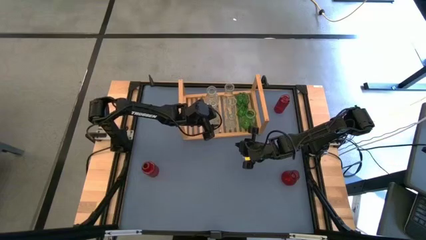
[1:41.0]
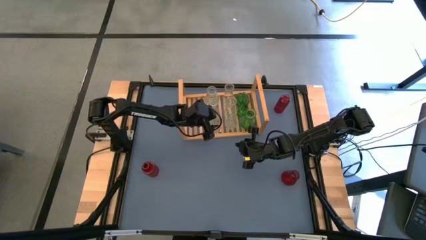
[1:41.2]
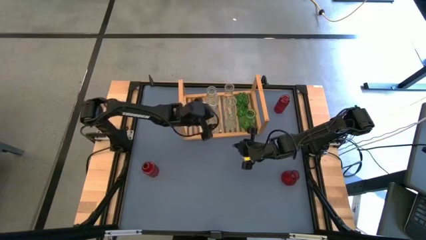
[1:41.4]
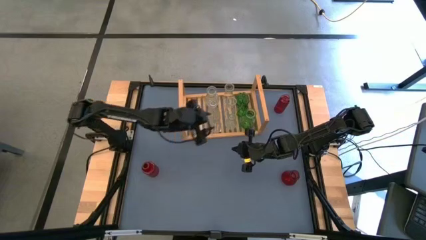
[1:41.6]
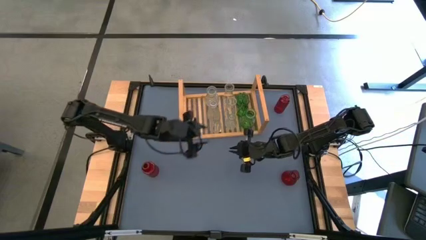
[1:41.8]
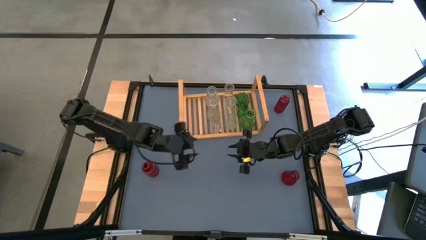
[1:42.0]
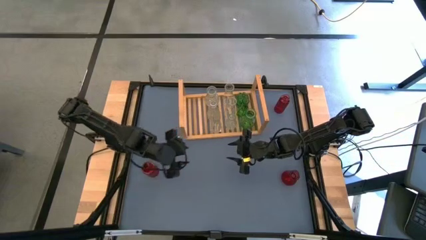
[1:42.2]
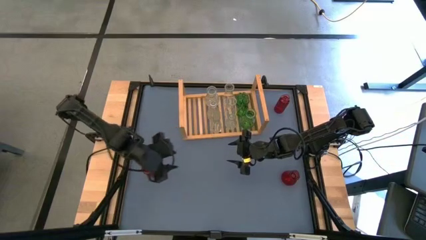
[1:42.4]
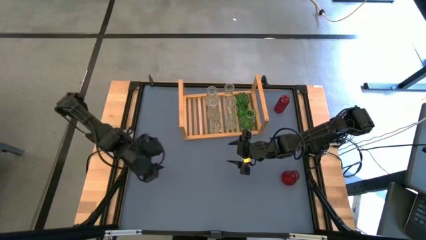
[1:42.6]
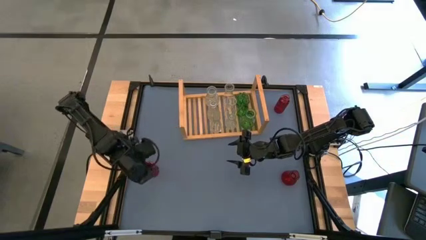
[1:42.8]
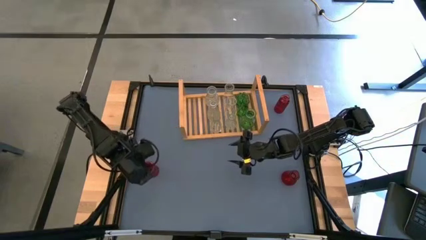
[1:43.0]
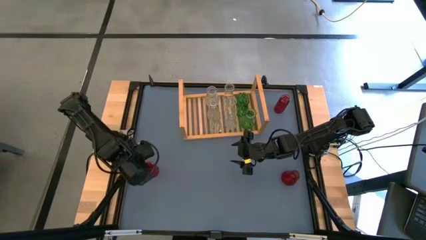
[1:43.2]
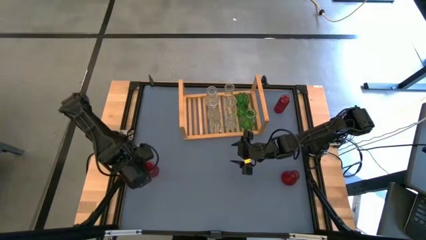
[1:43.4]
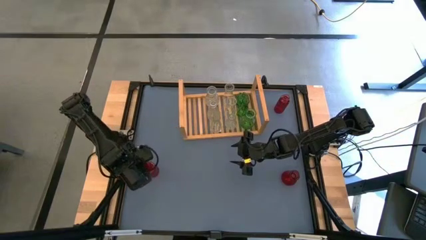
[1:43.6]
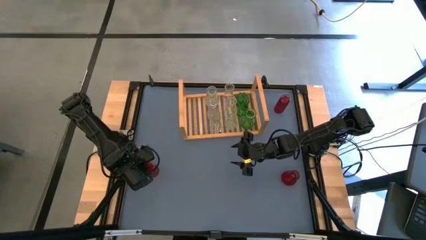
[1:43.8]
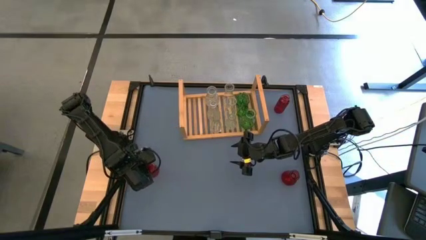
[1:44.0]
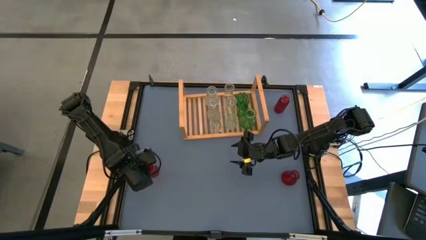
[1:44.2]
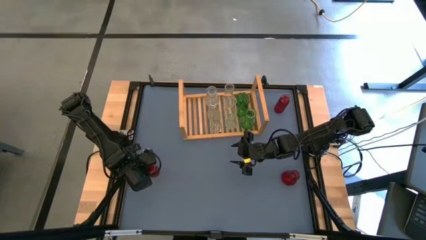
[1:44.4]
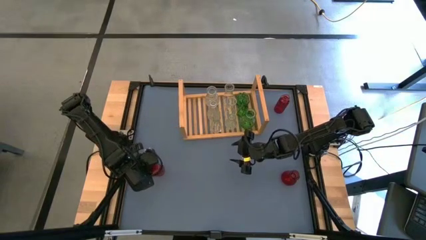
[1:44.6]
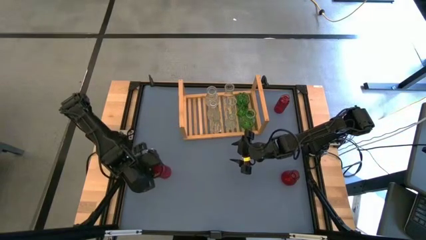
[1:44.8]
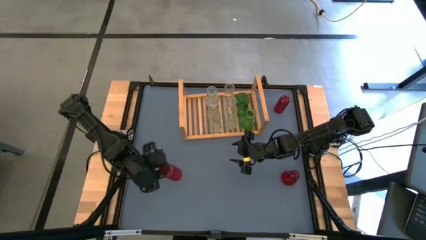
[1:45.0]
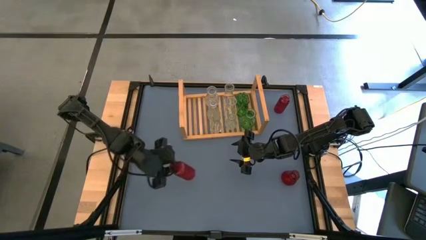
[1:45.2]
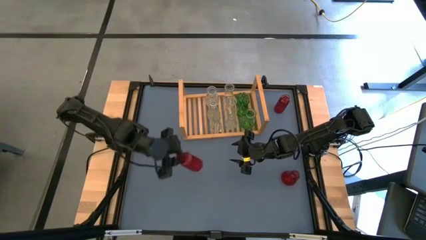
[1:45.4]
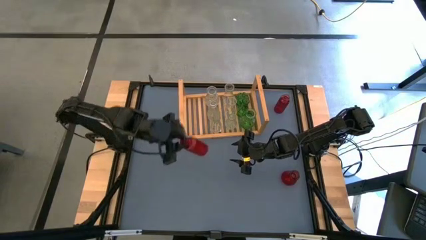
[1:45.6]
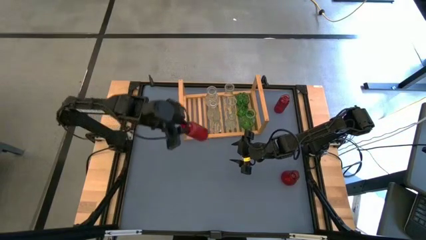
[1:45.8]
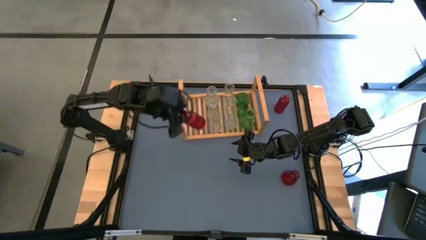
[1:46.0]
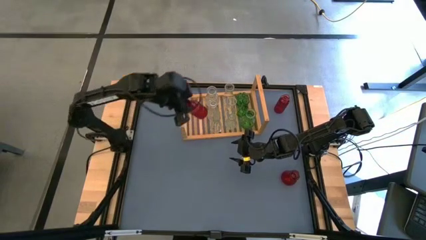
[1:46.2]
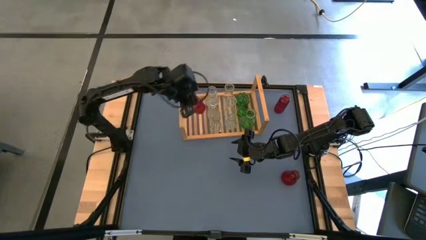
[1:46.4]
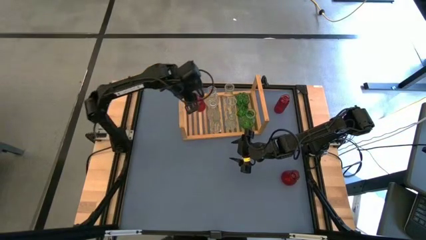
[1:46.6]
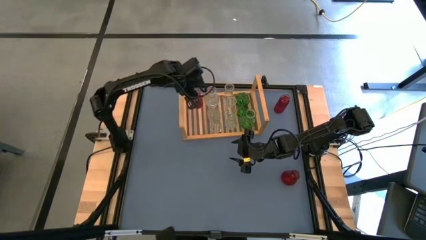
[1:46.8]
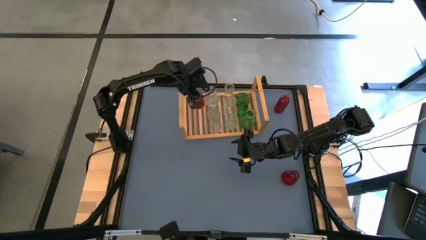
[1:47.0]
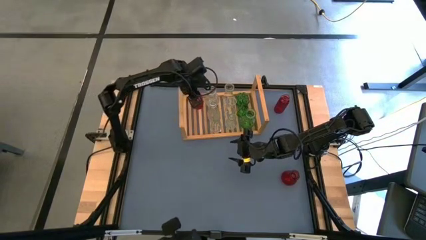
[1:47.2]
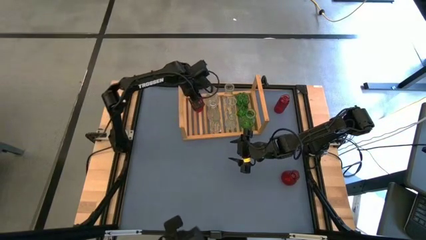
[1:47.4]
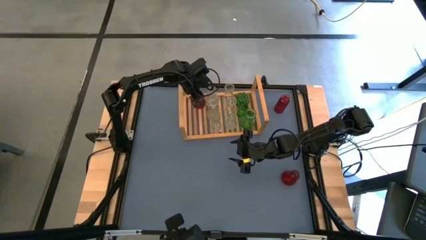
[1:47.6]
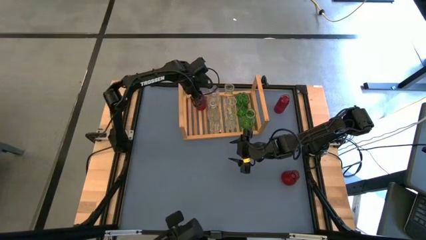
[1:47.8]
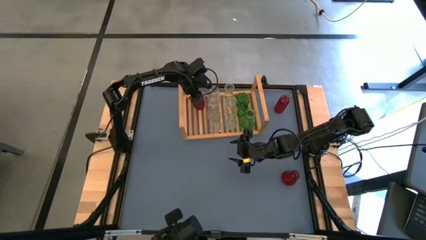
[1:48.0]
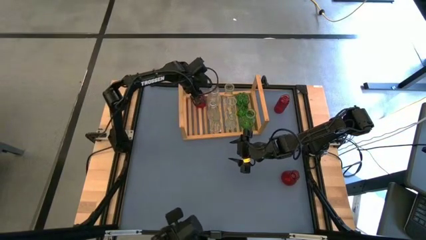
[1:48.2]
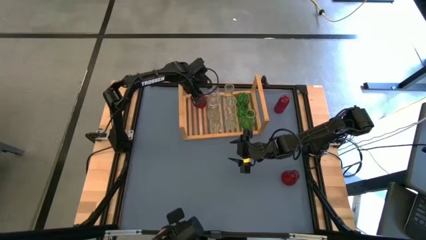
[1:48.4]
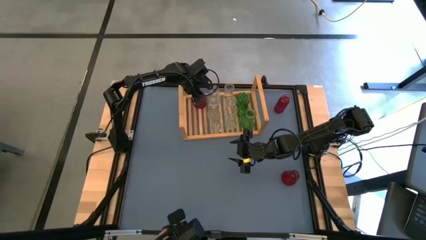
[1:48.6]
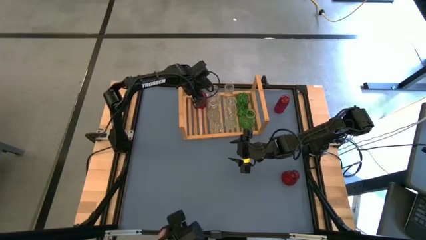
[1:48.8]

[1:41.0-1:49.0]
Task: sort vases onto shelf
Put the red vase on the shelf

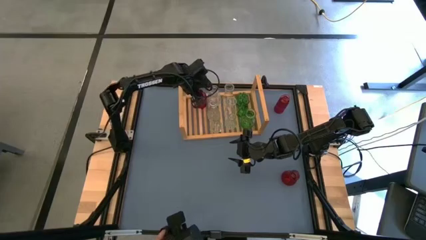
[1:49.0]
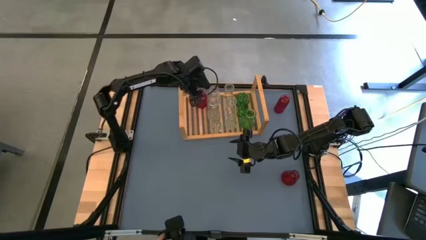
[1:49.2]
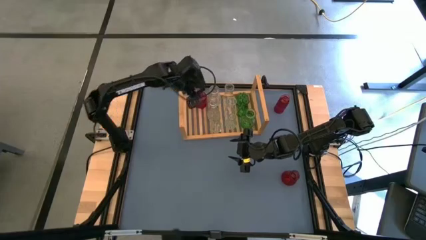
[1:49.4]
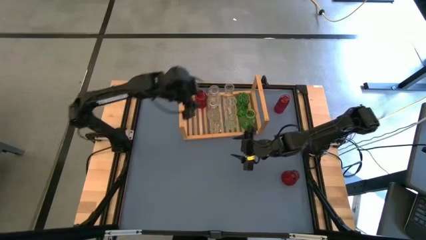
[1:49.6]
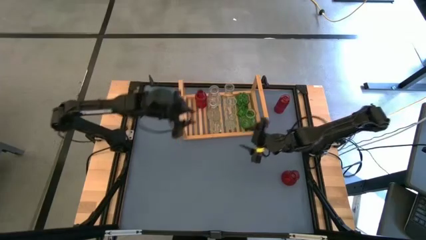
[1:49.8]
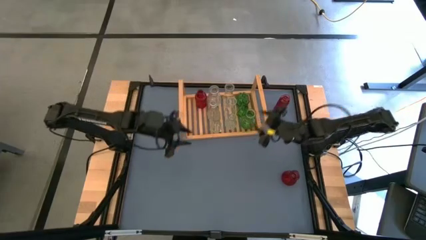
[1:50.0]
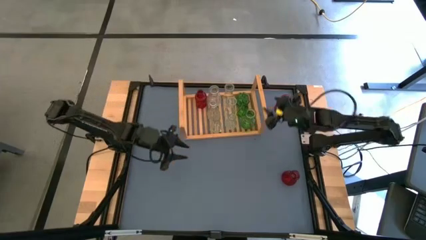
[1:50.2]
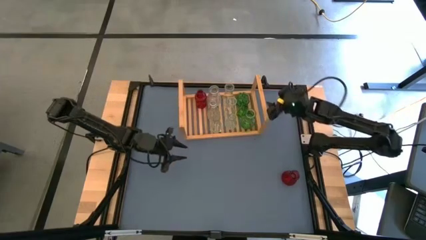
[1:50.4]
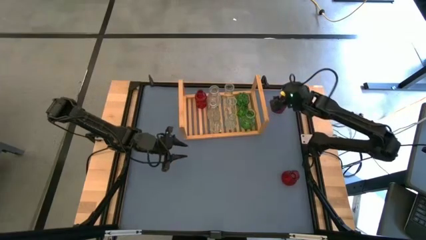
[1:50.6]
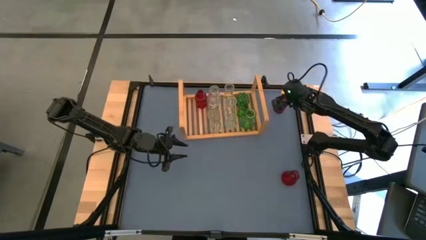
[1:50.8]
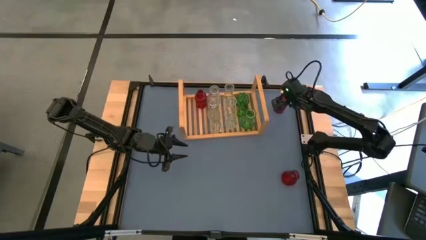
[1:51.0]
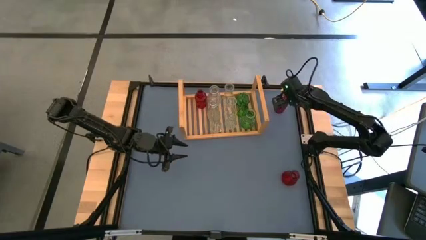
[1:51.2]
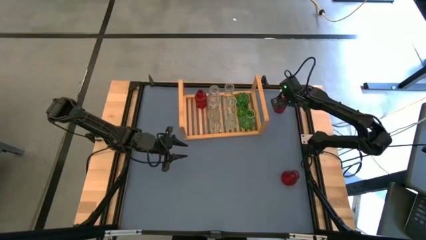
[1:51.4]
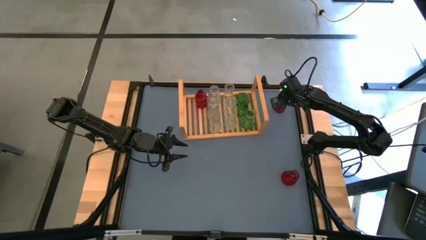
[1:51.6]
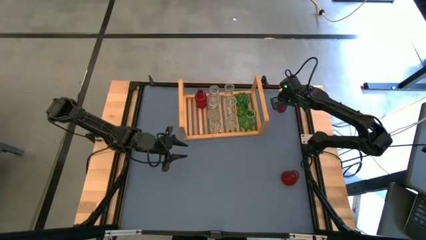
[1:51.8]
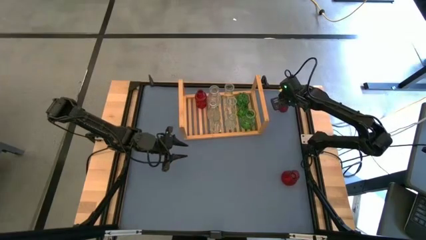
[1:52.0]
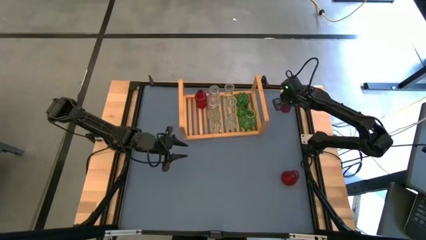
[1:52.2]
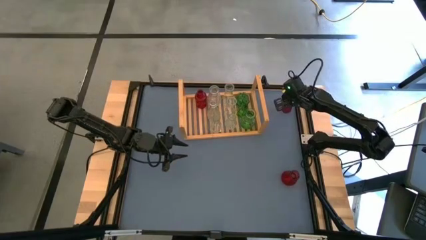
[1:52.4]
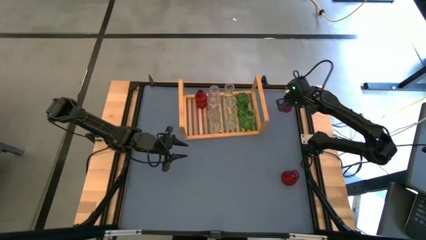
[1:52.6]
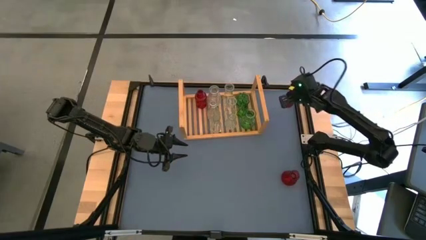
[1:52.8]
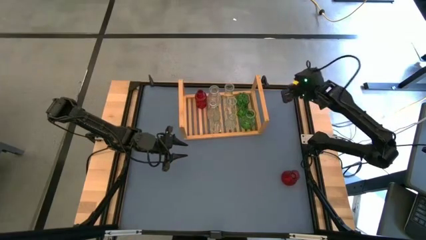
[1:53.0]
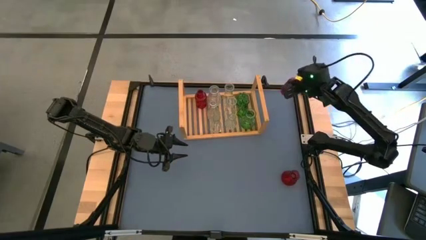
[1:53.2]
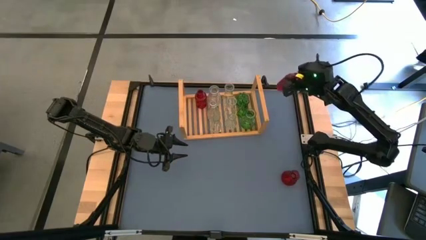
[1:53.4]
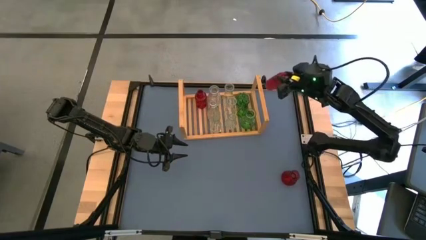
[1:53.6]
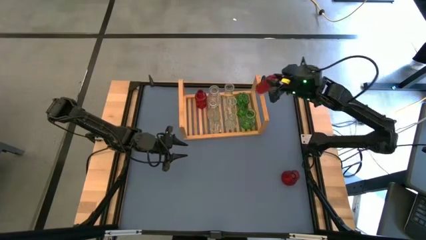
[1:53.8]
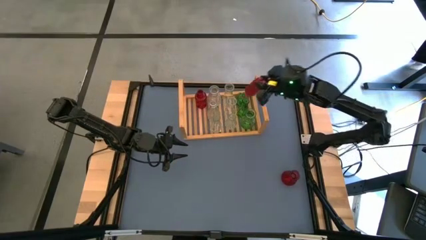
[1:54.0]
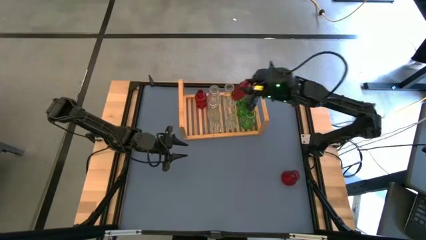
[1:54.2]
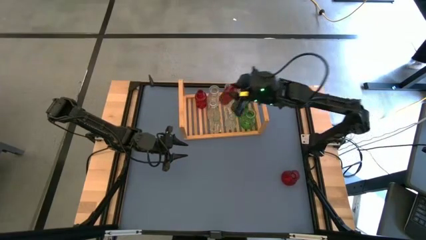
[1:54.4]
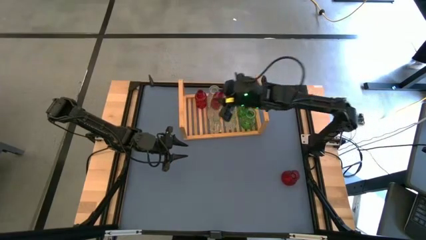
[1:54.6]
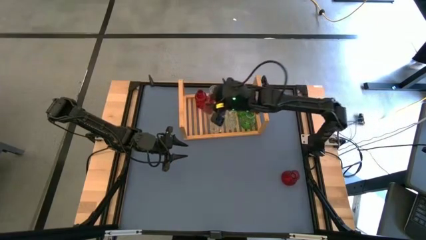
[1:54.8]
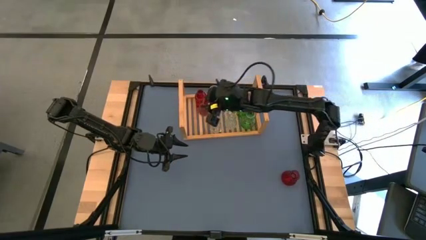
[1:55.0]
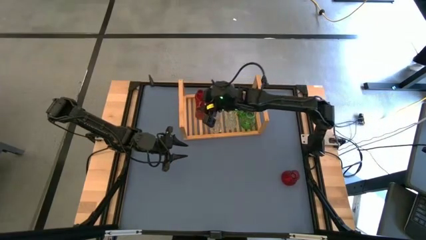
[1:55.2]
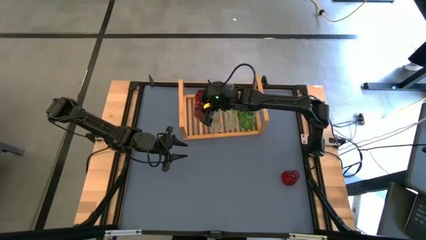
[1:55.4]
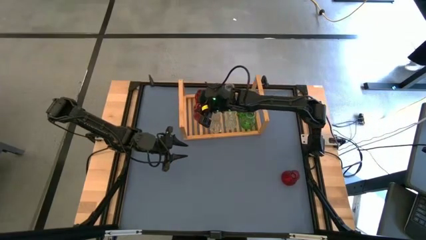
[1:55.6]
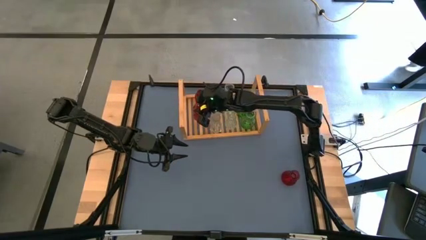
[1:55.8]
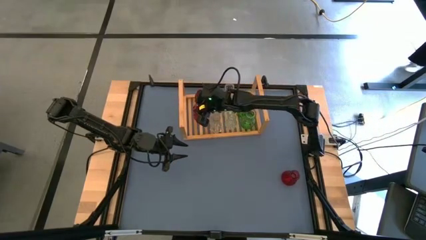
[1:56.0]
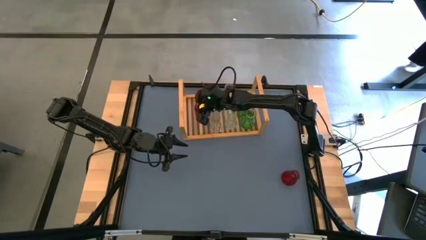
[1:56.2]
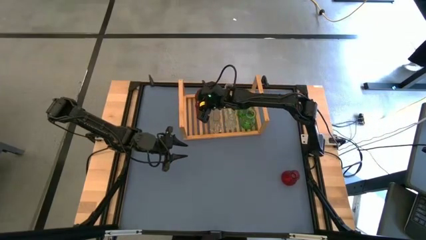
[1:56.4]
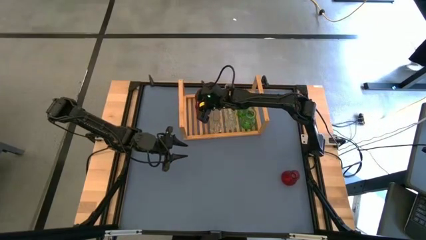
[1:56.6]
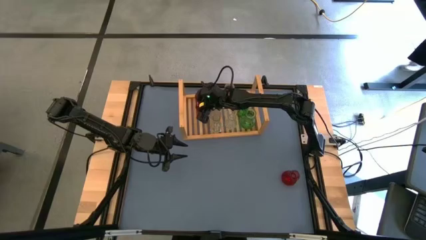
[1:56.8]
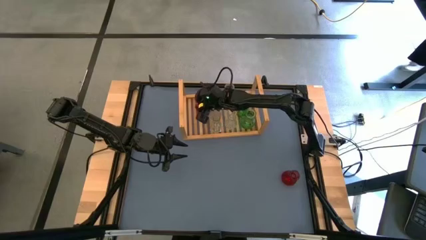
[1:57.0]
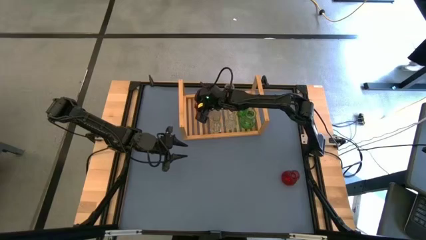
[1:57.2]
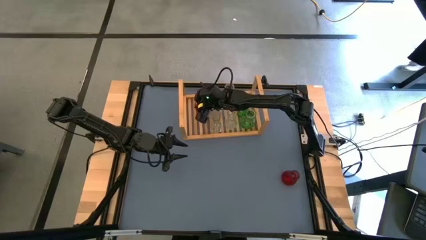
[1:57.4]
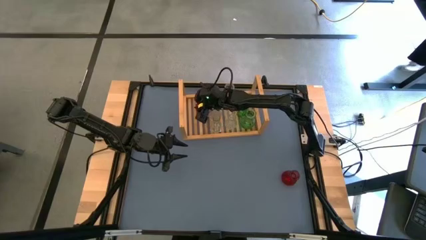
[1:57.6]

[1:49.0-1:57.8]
Put the red vase on the shelf aligned with the other red vase
